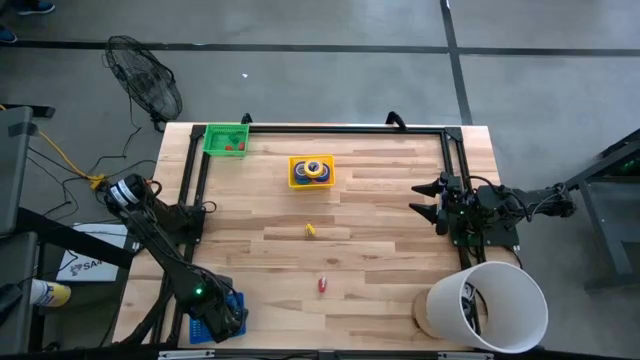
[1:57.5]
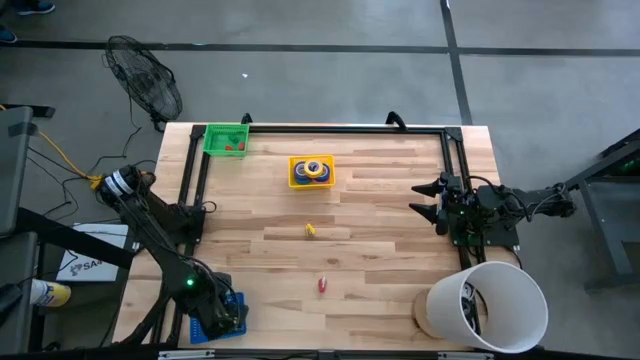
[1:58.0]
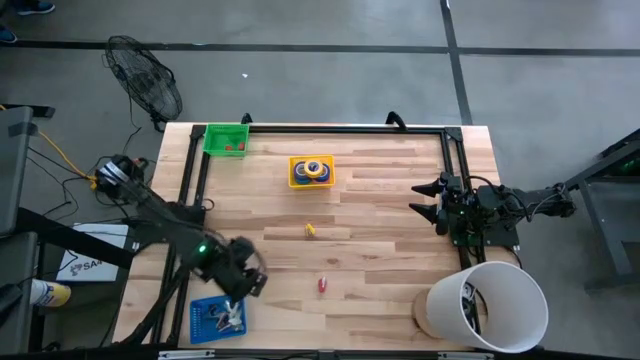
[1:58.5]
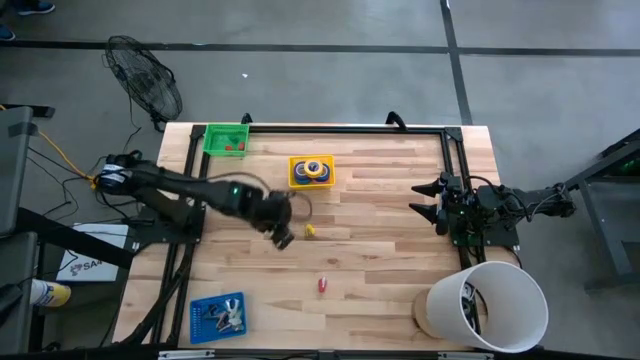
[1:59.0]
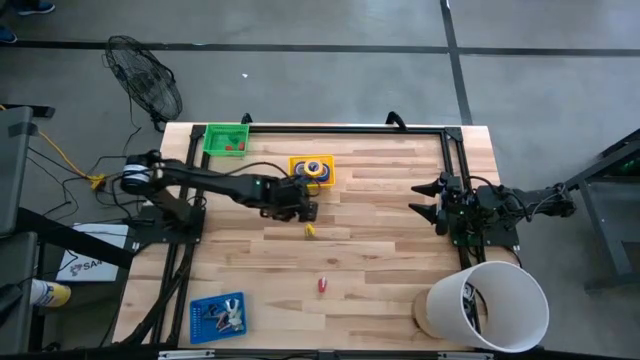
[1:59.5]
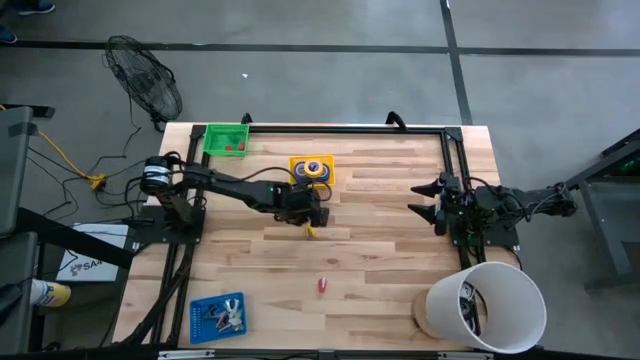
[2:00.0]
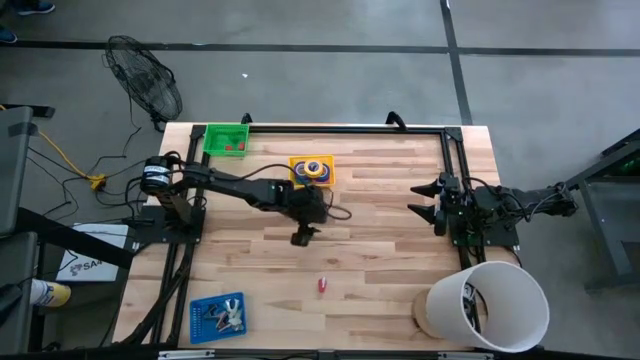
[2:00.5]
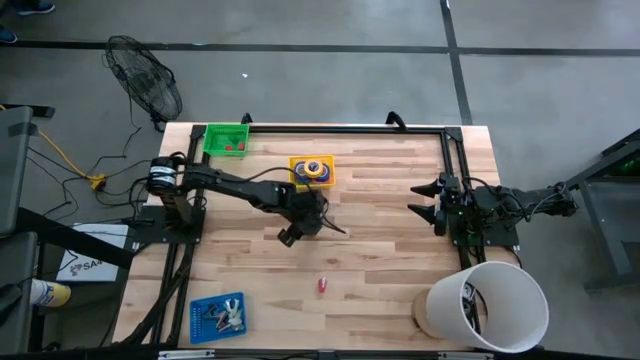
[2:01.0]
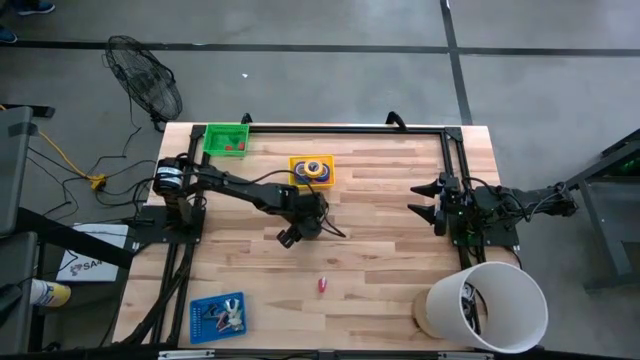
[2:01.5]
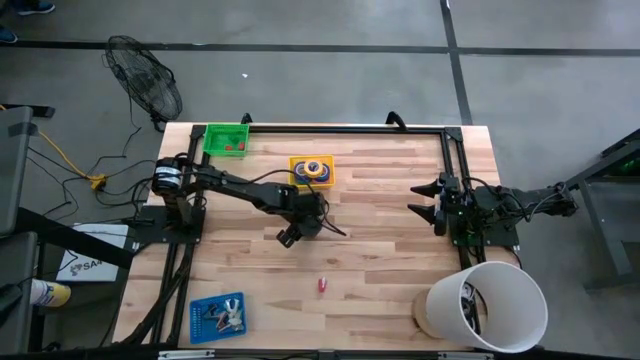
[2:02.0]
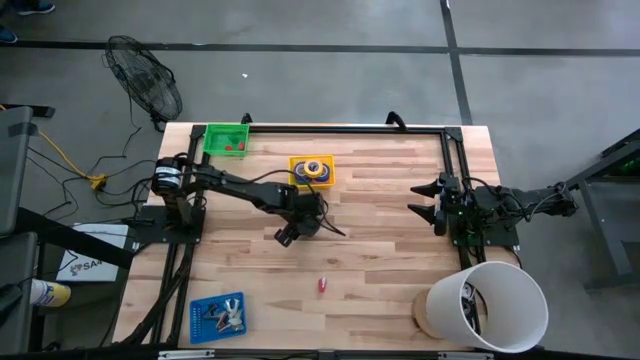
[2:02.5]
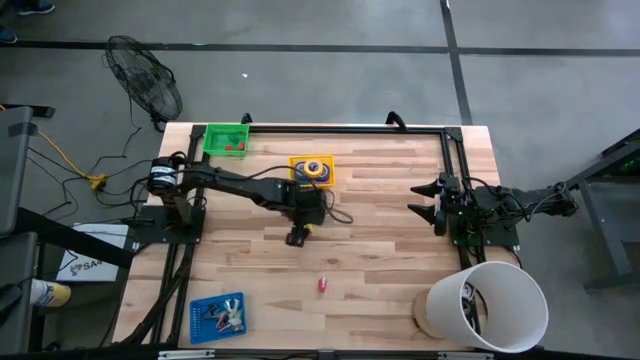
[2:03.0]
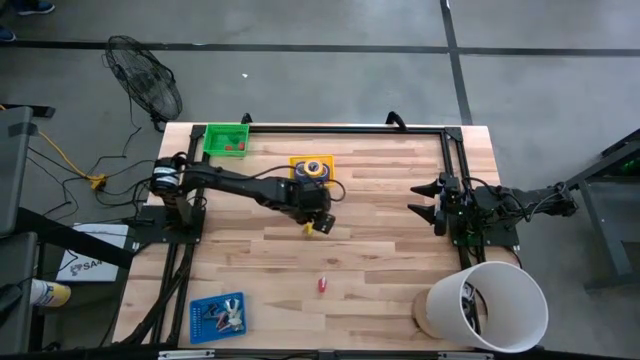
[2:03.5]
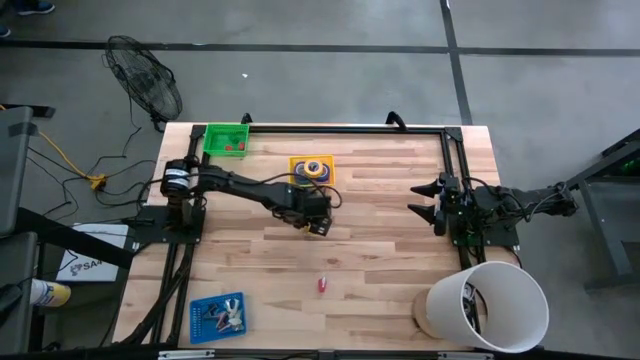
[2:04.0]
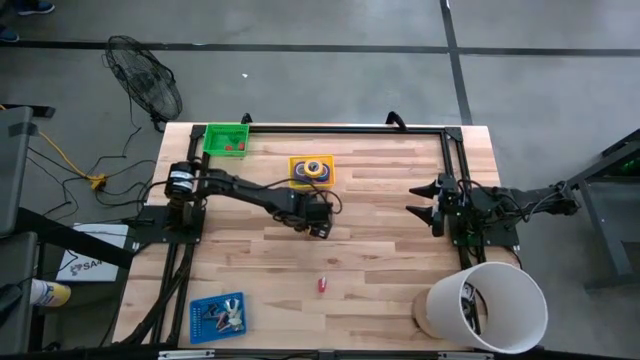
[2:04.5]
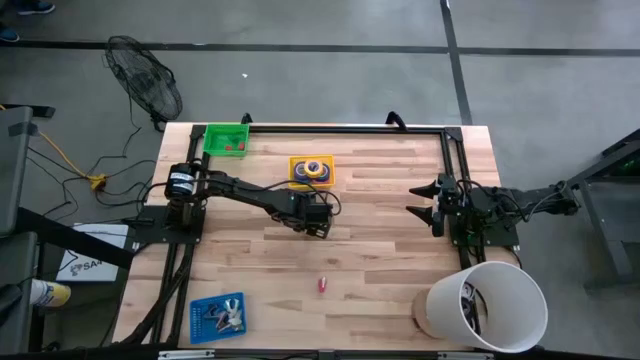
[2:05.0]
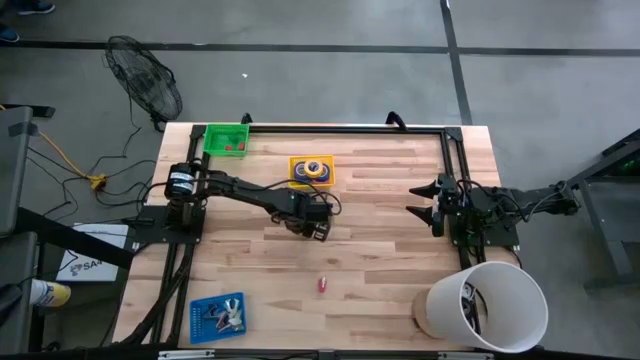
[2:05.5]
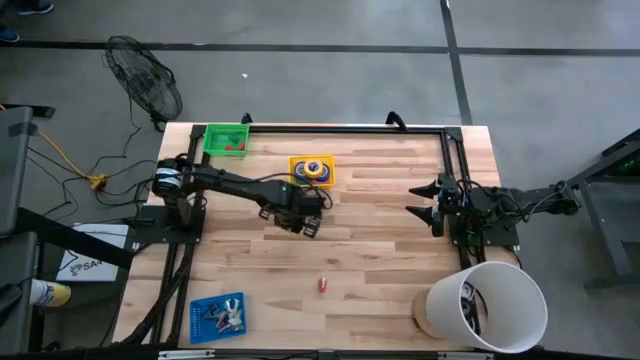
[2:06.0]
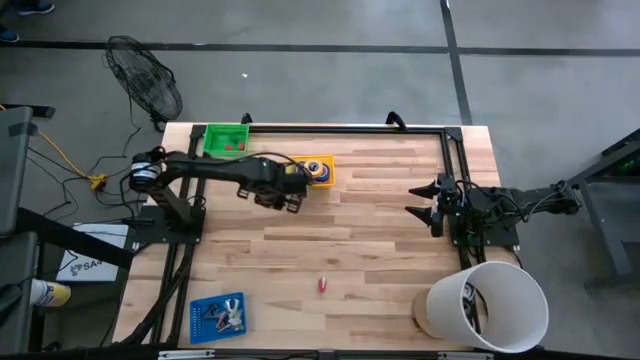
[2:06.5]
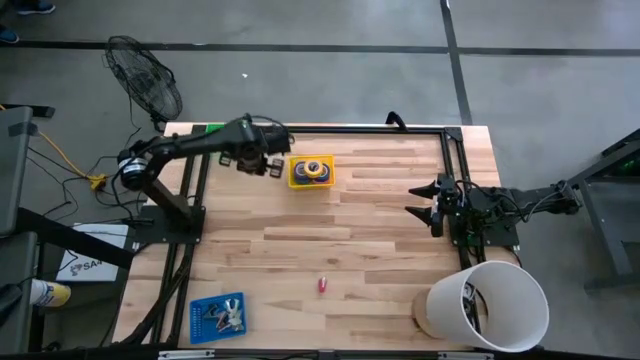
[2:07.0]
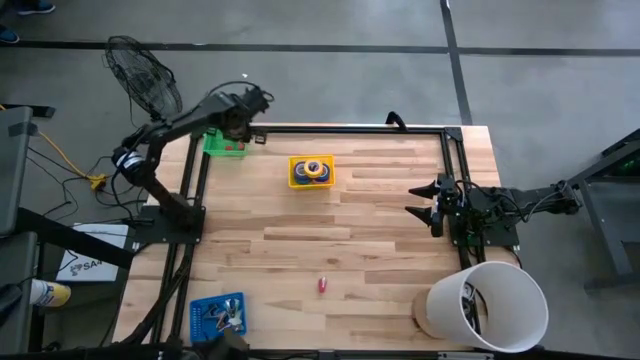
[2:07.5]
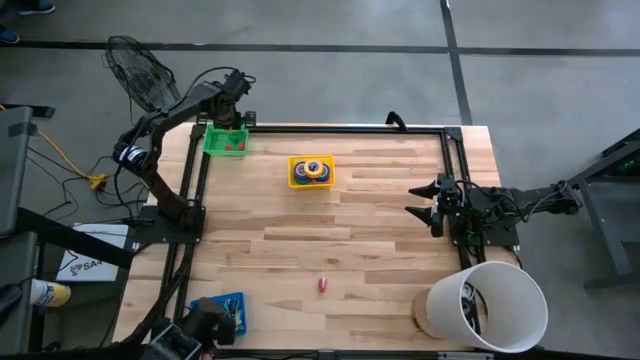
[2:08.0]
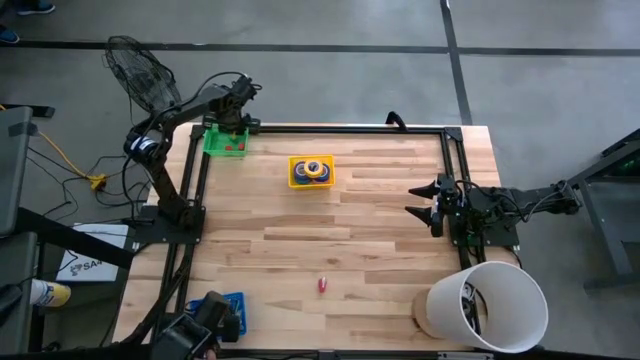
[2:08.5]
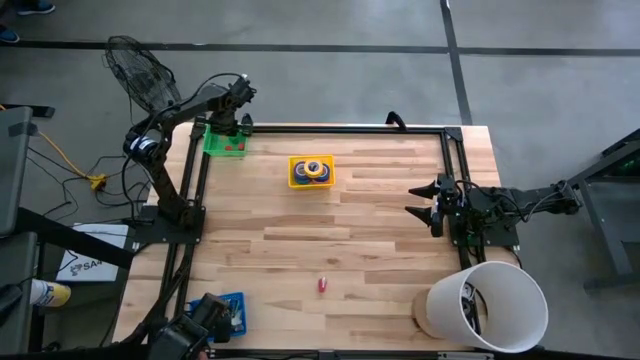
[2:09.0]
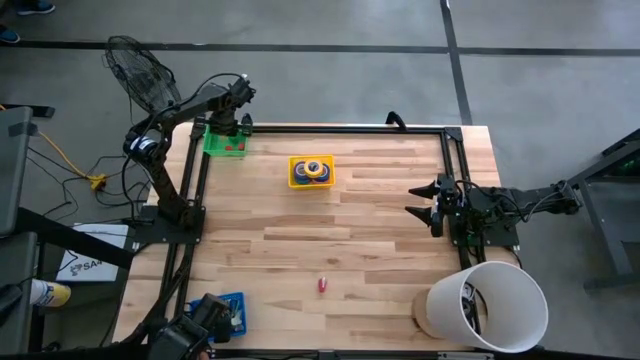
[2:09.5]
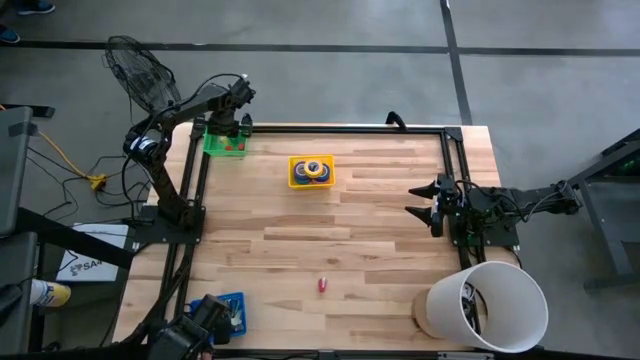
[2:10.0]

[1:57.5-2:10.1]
Task: Pick and place Stapler, Stapler remover, tape
Put the yellow stapler into the green bin

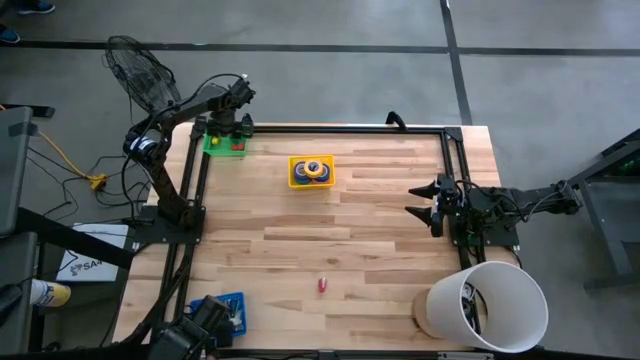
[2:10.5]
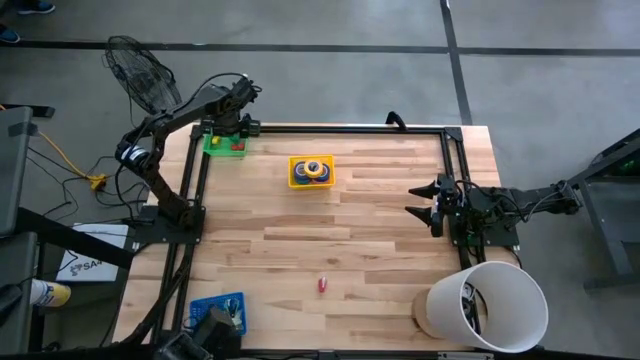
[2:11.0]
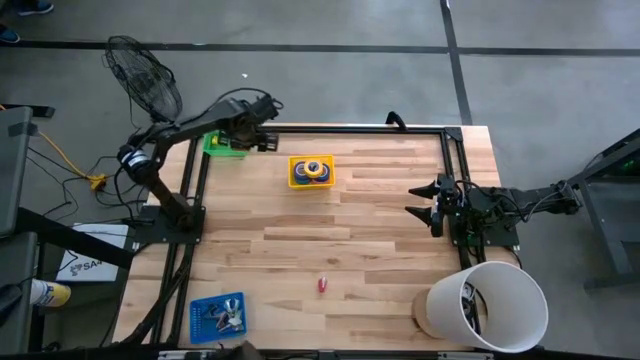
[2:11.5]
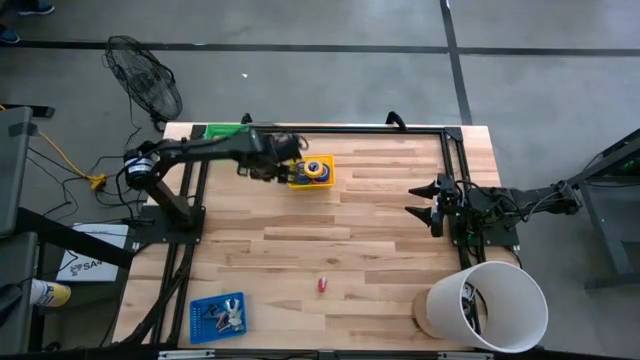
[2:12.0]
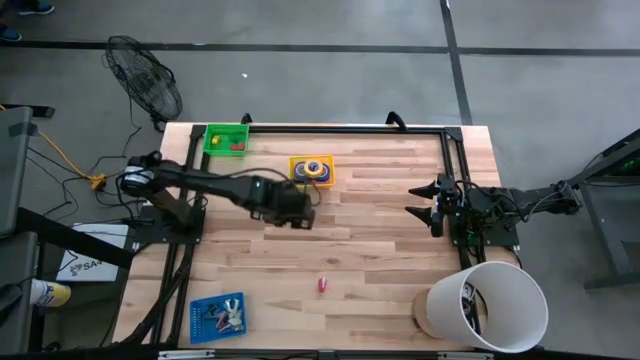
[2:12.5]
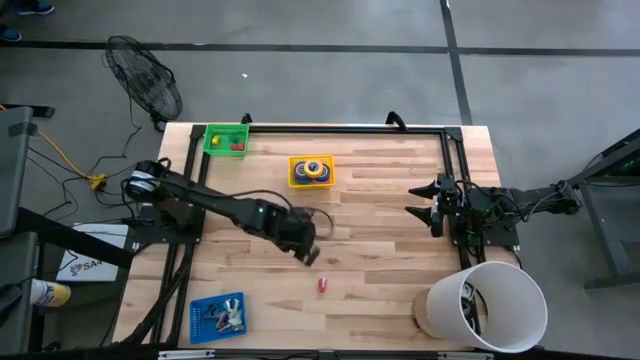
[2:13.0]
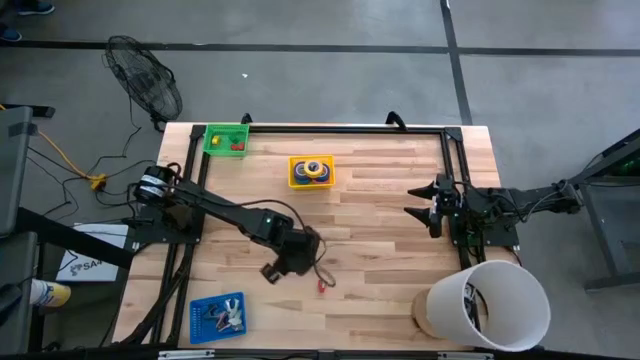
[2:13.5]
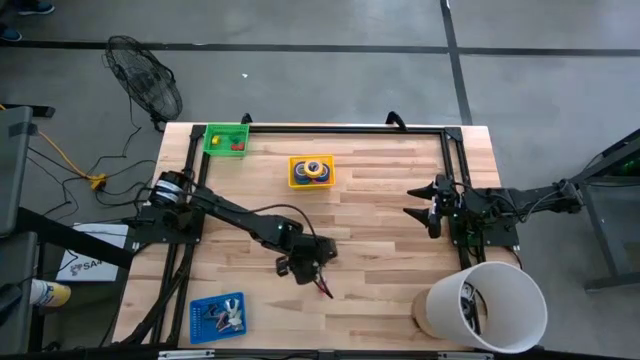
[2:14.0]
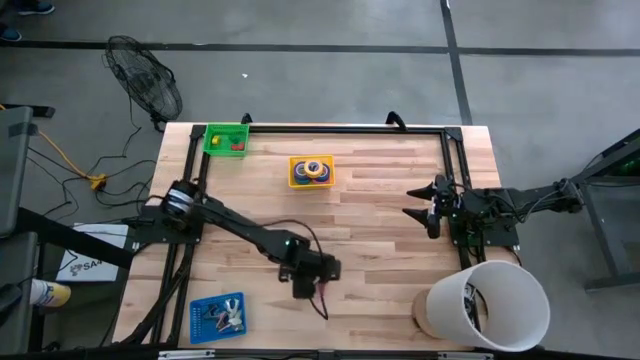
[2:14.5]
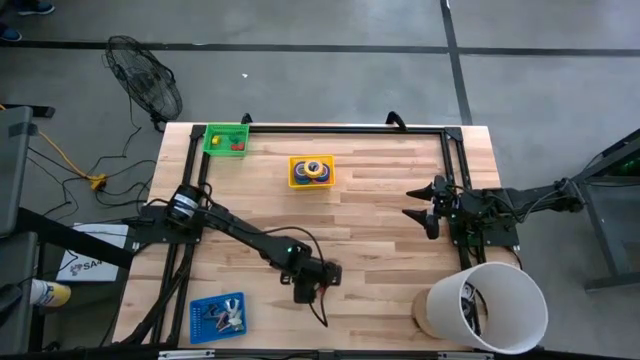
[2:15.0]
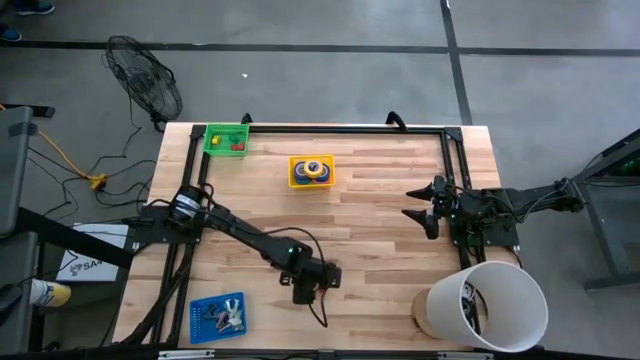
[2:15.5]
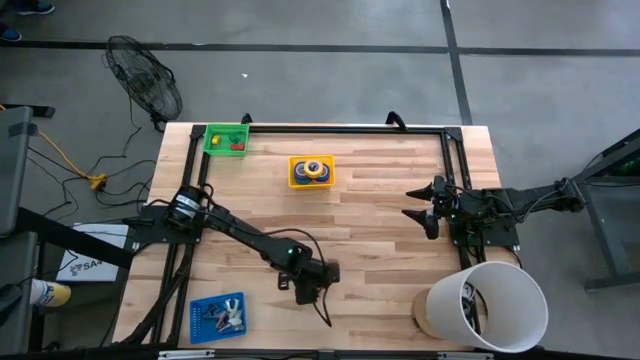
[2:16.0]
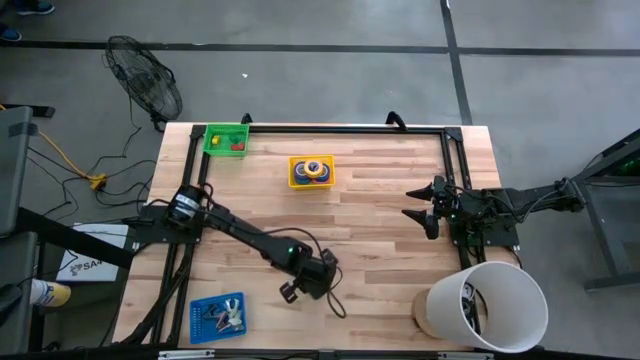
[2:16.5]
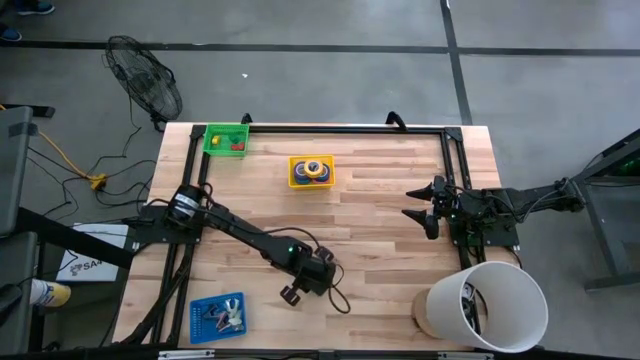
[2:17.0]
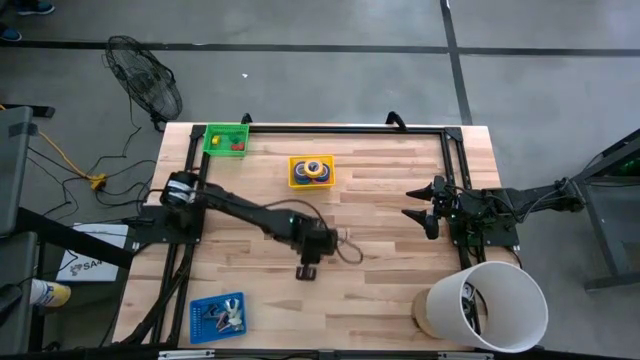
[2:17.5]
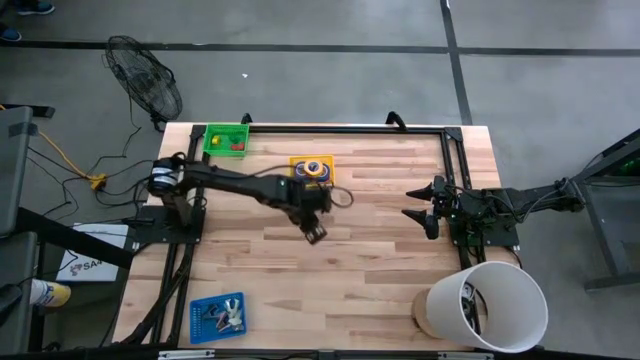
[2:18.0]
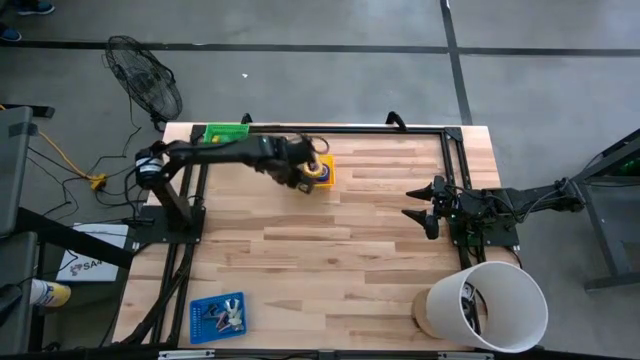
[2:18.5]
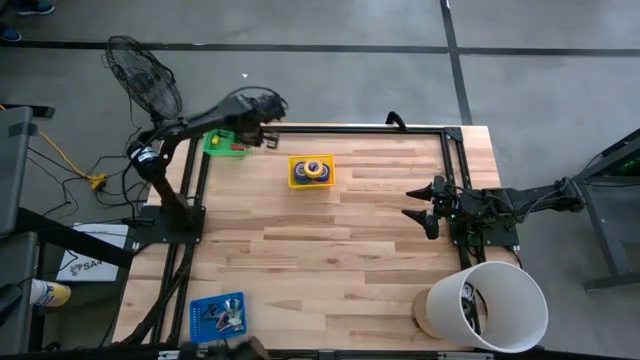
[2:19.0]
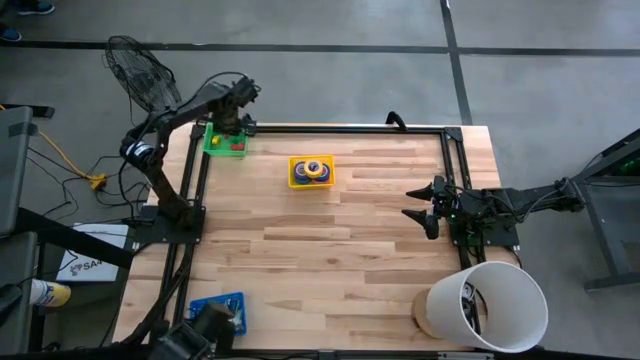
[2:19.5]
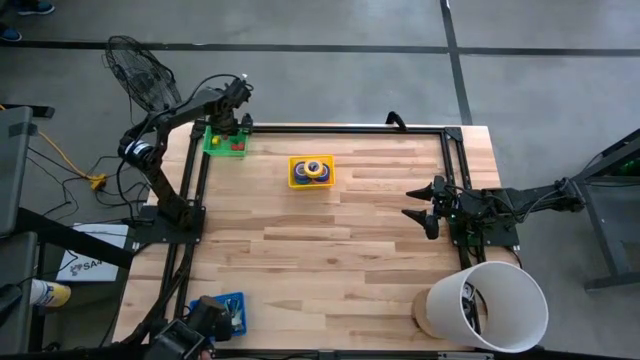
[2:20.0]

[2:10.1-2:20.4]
Put the red stapler into the green bin
